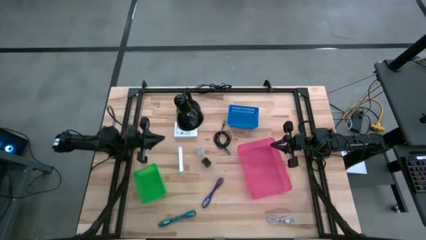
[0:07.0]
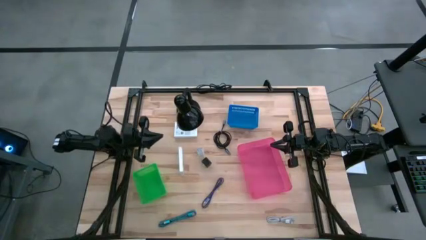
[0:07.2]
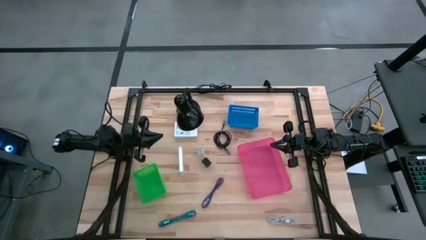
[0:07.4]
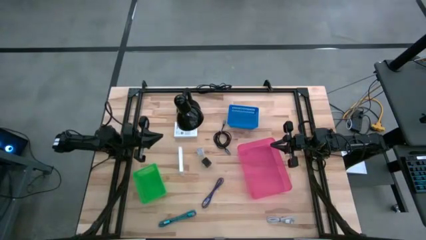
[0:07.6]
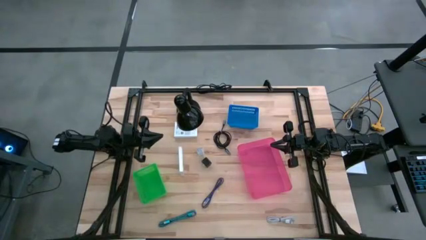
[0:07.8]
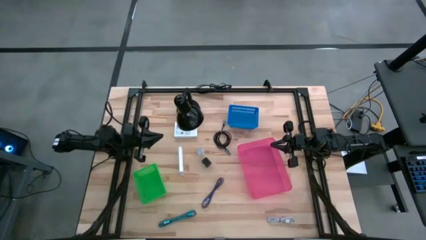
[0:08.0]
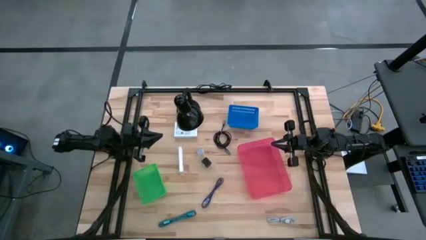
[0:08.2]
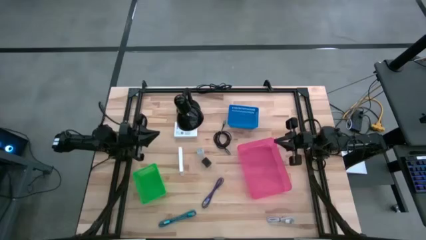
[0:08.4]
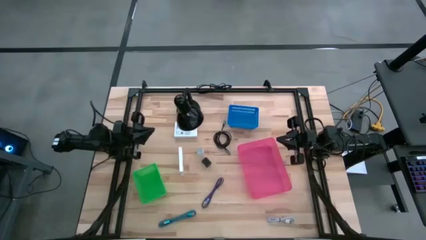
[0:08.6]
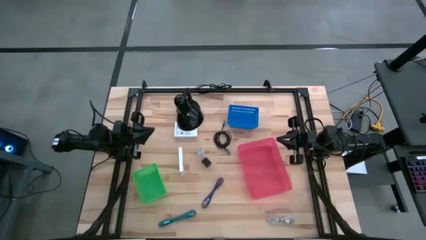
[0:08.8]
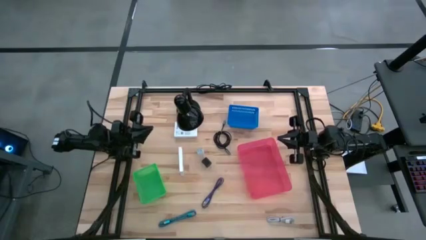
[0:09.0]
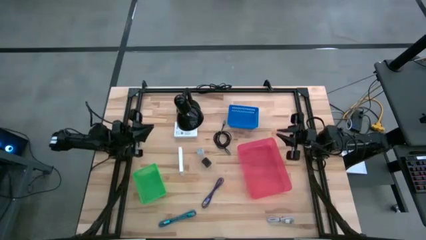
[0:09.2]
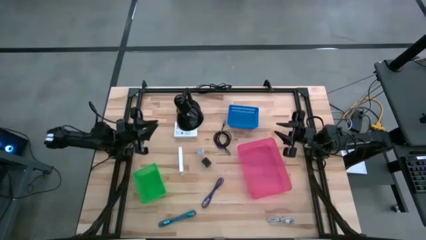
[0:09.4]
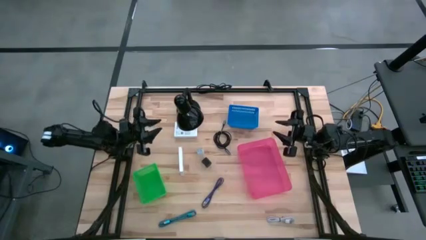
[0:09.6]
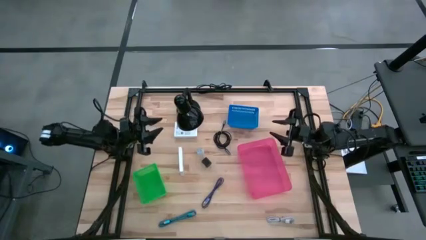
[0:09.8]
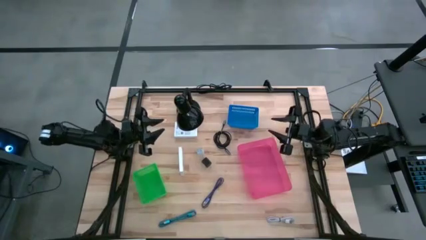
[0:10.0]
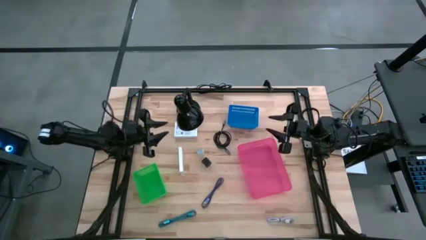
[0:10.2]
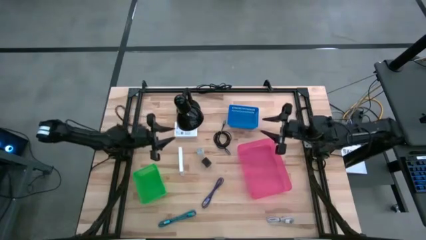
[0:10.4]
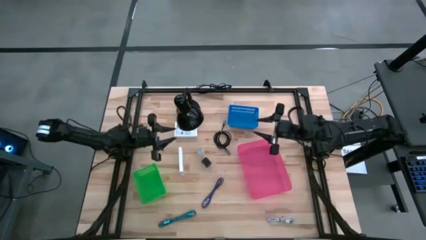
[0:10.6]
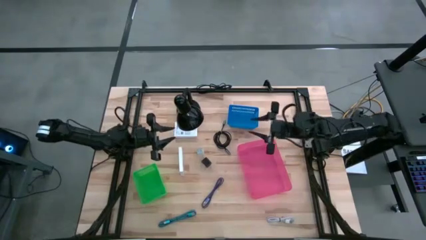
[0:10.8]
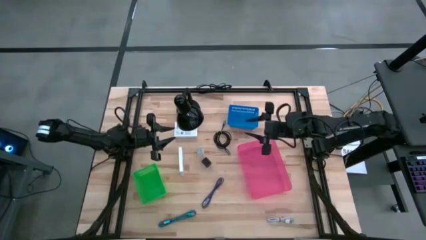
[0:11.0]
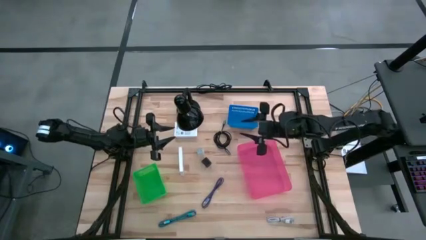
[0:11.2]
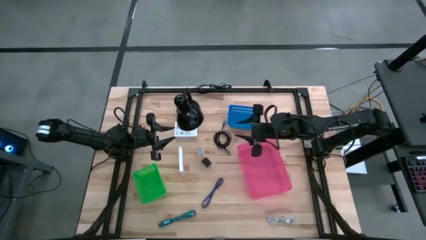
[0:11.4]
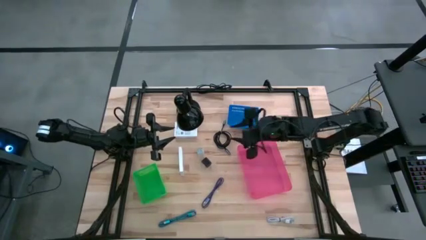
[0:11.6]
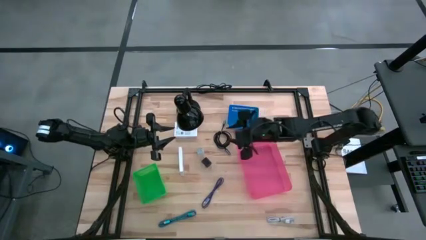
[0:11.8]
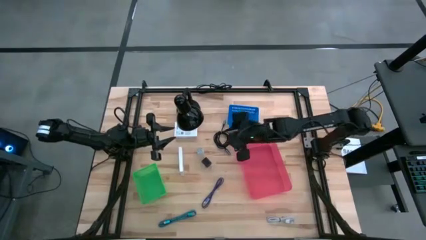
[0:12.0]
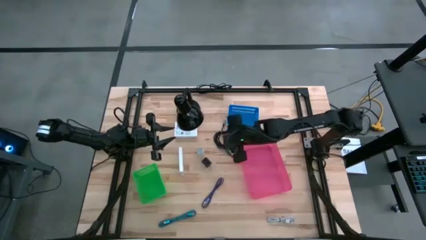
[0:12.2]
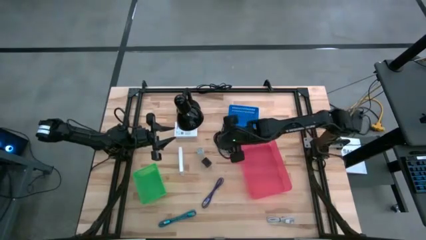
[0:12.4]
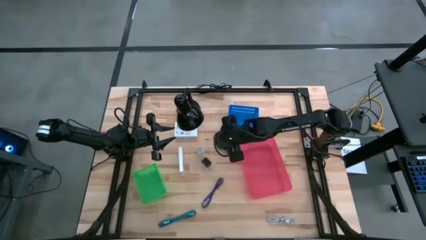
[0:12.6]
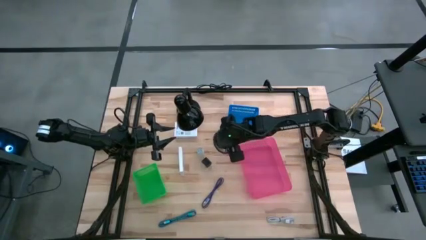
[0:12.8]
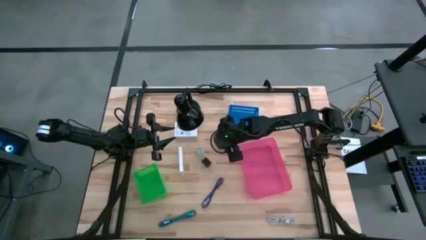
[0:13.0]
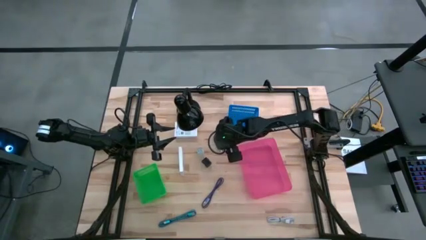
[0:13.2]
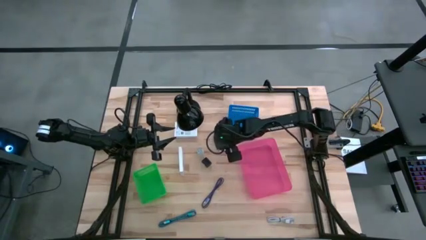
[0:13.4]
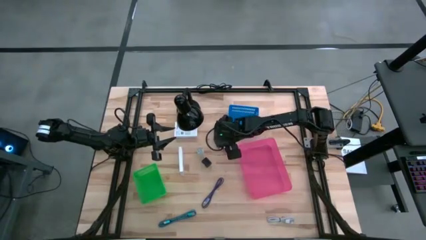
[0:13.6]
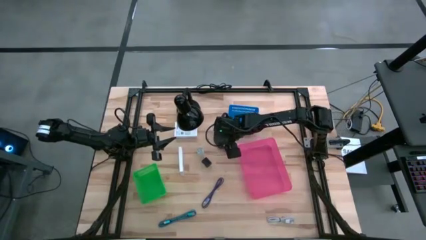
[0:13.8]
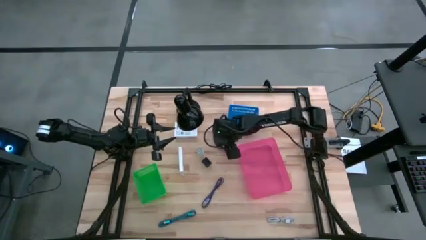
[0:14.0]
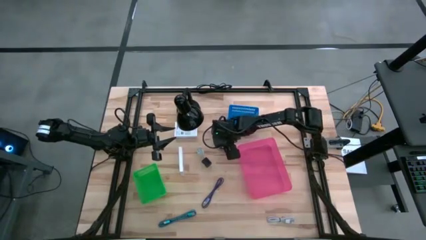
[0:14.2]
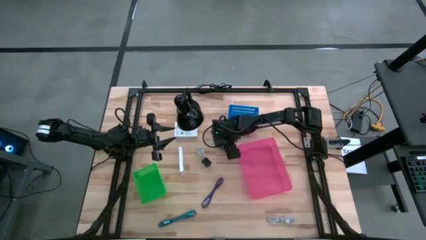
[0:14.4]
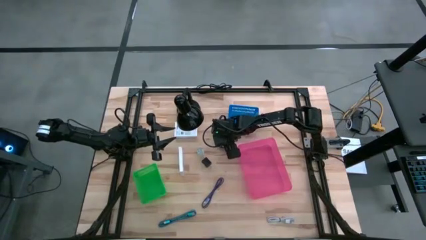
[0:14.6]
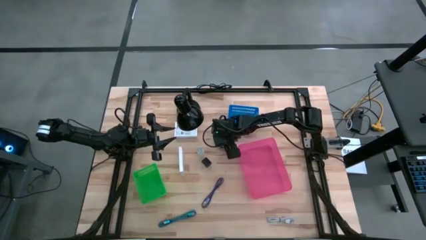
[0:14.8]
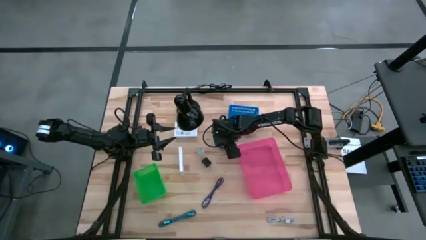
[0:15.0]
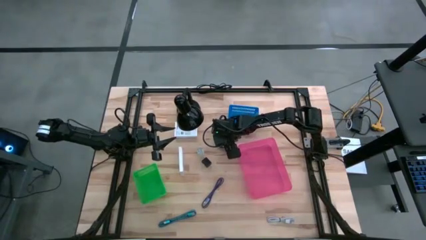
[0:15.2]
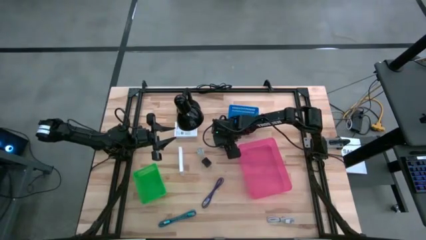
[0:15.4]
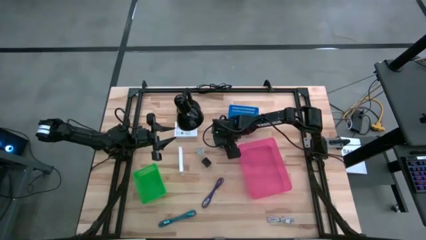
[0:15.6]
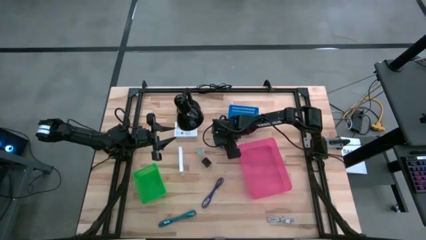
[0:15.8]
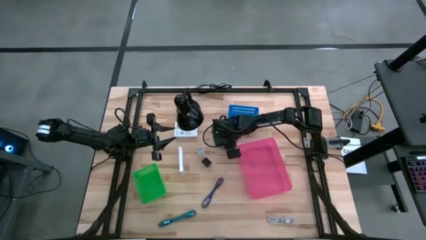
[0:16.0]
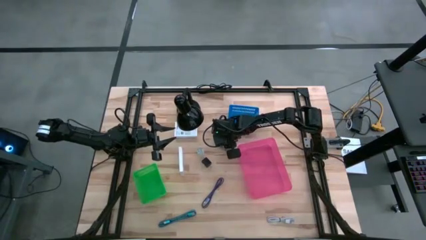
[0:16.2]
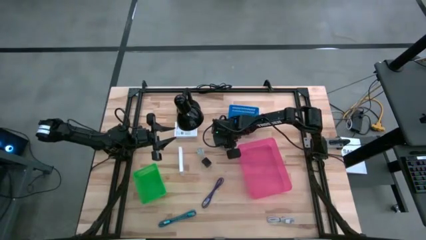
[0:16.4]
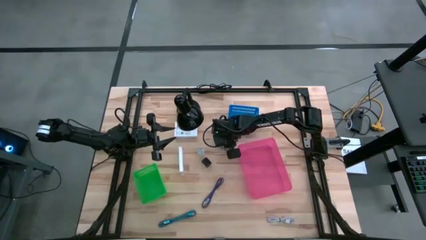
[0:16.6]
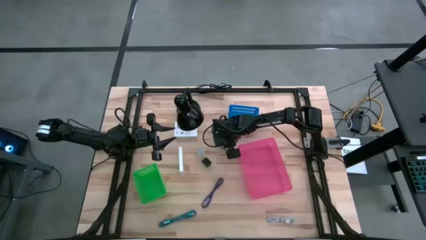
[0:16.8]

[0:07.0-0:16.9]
Task: Pick and place items into bin
Put the black charger cable into the pink bin

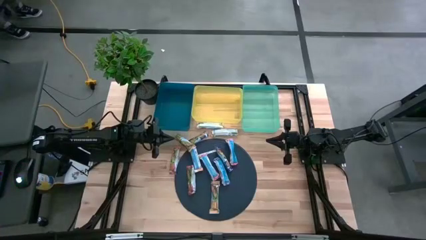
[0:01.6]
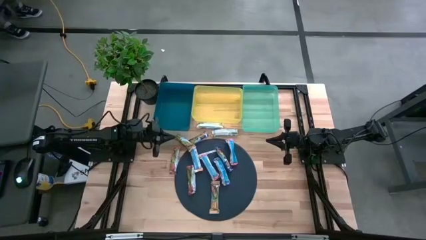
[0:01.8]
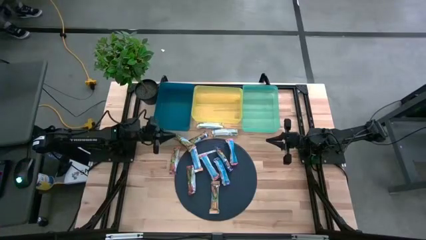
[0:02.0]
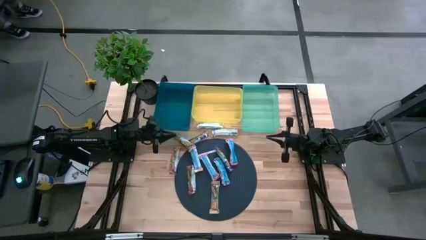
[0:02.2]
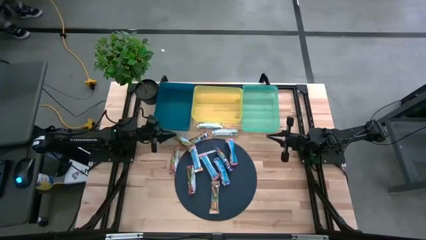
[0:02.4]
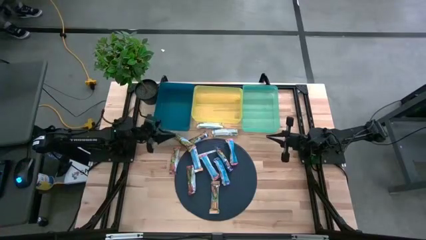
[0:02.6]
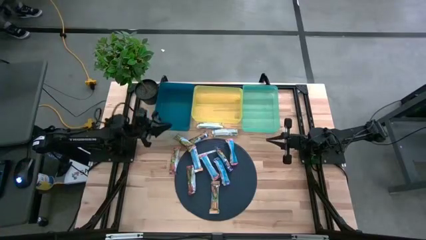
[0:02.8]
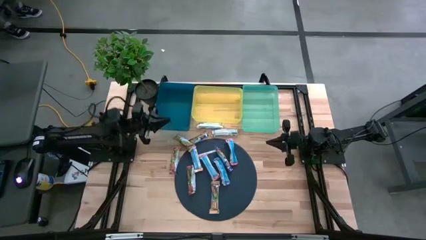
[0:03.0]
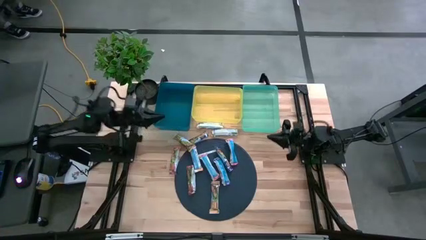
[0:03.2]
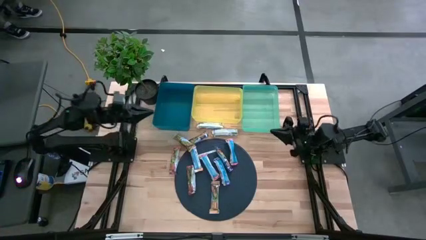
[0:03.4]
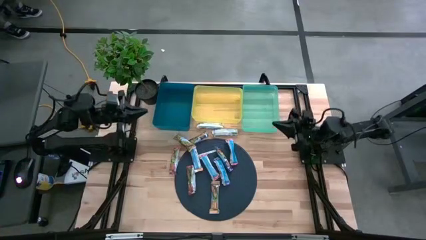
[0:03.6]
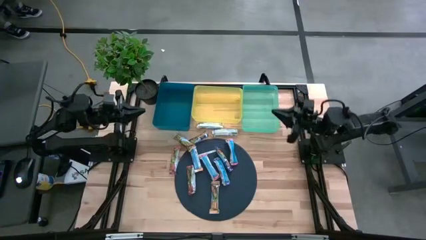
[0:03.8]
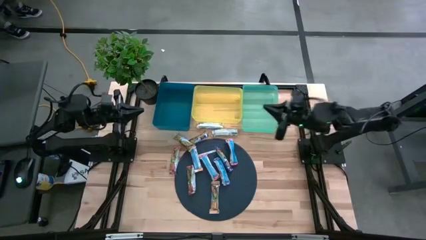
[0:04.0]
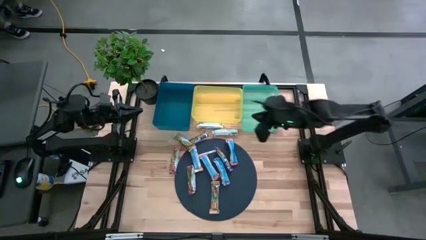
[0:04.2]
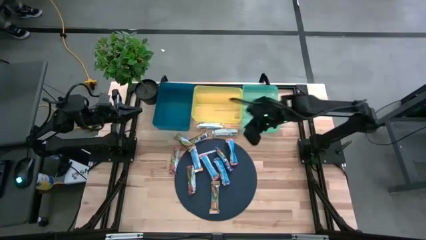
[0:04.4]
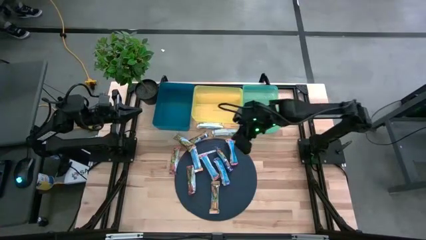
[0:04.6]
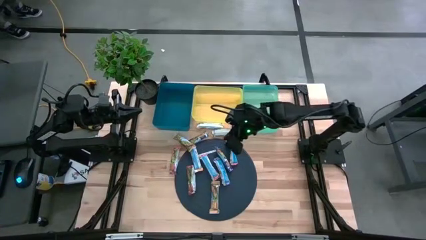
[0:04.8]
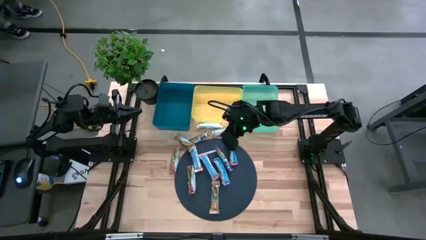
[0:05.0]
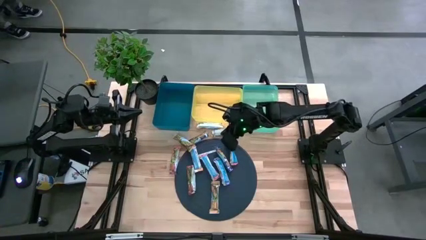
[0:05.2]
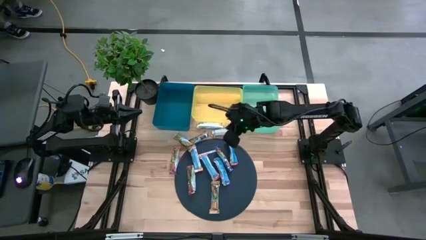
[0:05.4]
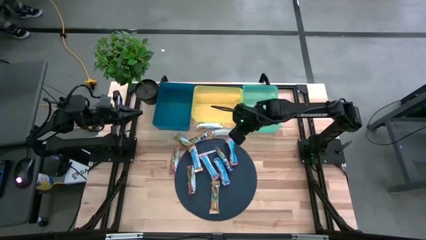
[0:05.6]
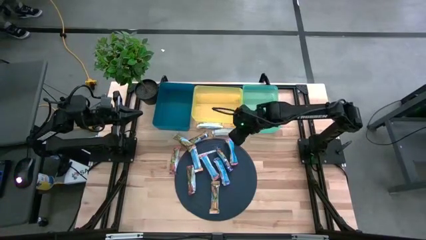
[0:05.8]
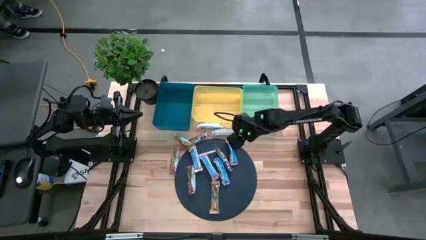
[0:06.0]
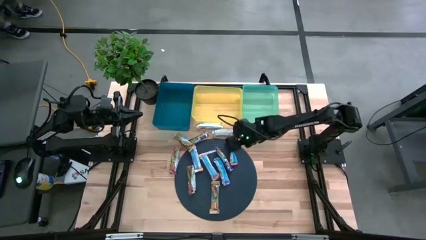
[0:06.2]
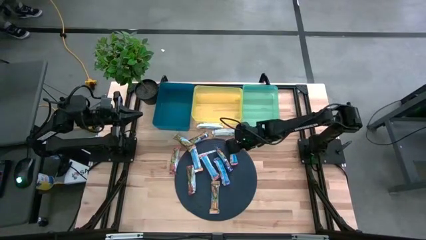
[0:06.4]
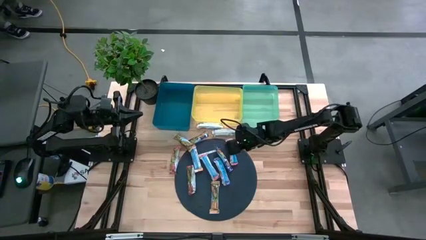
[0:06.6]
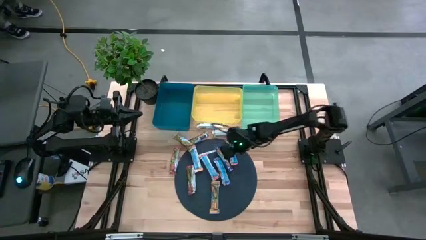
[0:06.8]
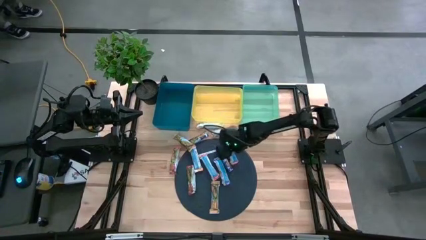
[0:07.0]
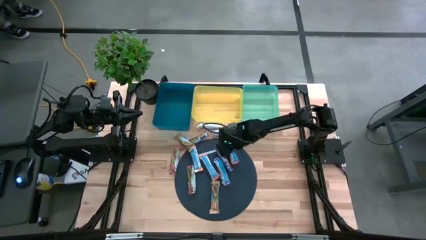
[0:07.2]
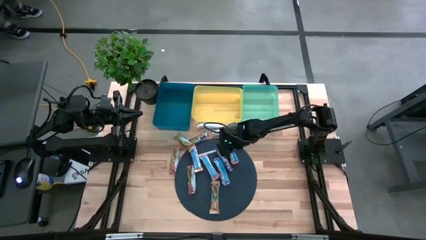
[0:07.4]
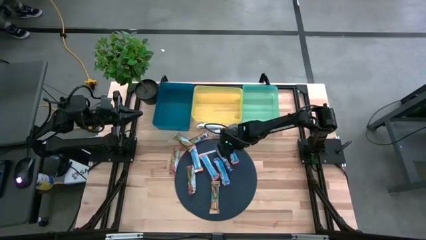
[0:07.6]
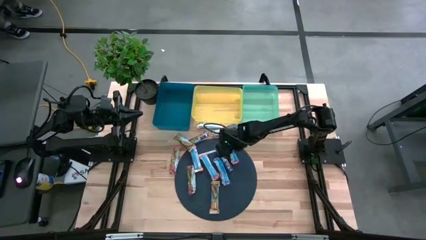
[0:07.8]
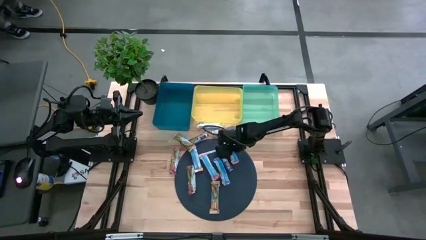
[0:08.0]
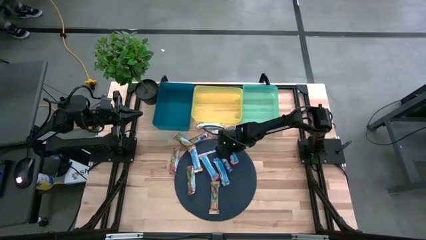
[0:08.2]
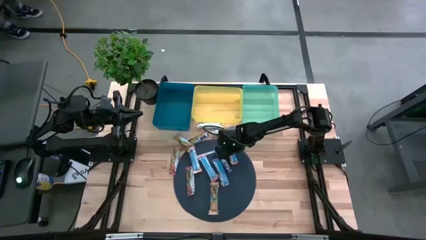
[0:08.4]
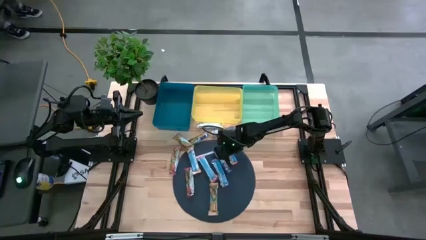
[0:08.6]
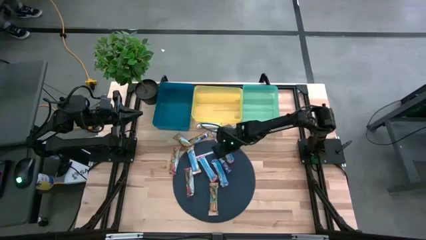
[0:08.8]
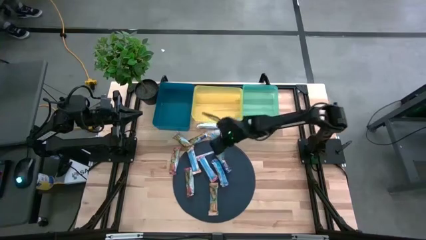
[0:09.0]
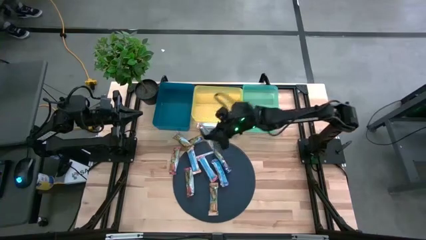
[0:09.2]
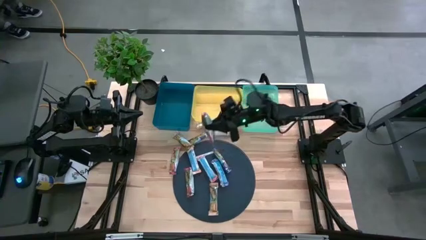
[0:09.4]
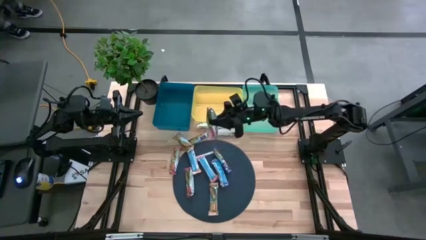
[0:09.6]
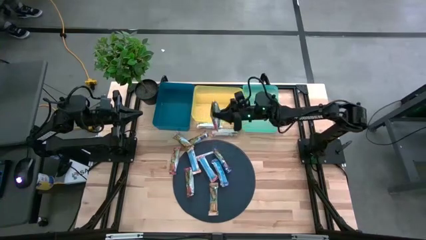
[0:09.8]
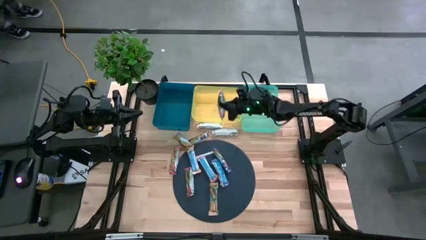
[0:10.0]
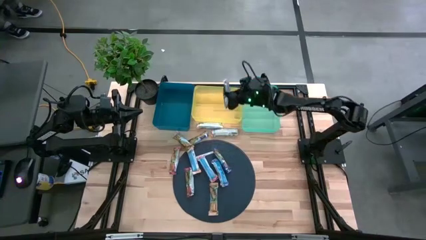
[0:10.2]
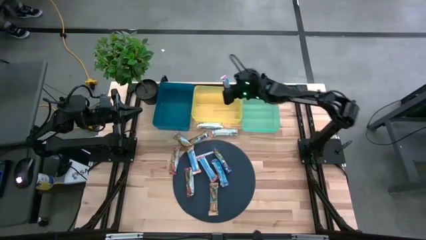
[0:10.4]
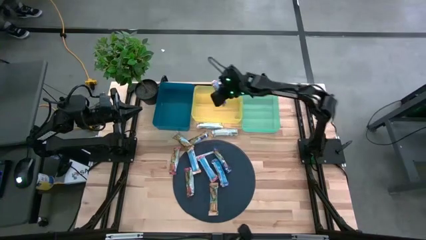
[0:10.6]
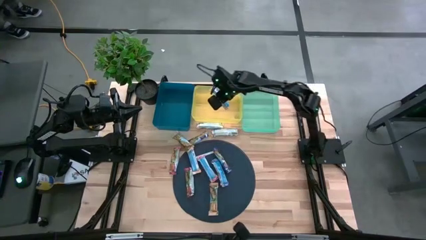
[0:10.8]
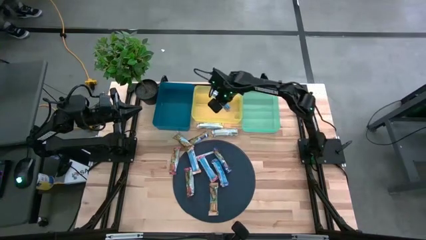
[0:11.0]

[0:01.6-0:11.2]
Task: Pick and place Granola Bars by type
Put the red granola bar into the yellow bin
